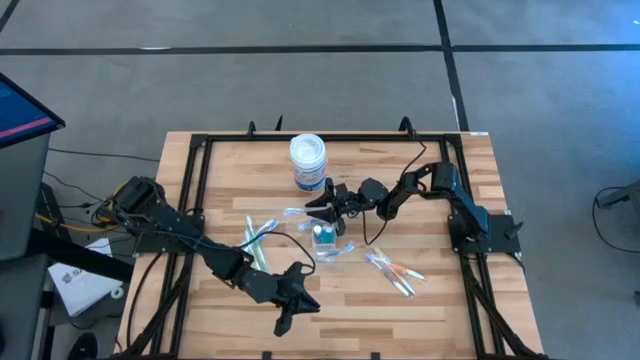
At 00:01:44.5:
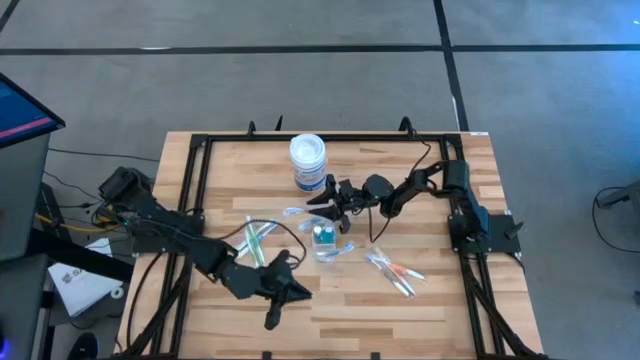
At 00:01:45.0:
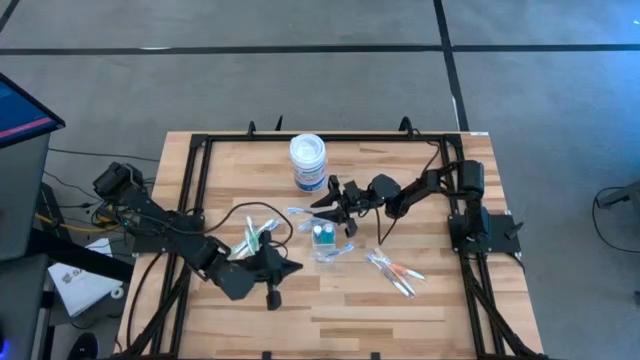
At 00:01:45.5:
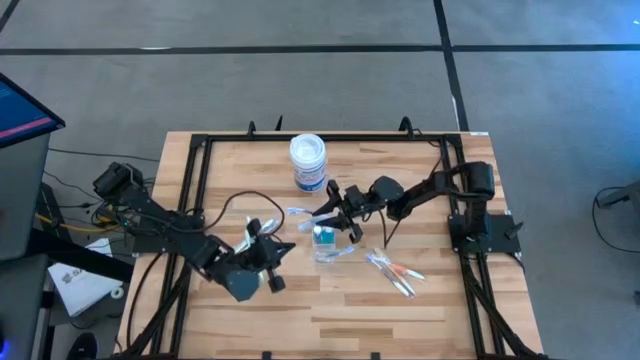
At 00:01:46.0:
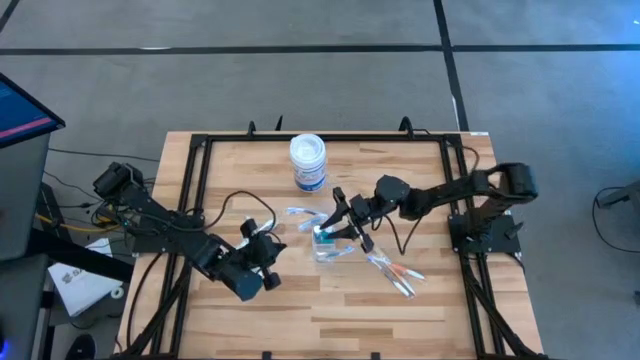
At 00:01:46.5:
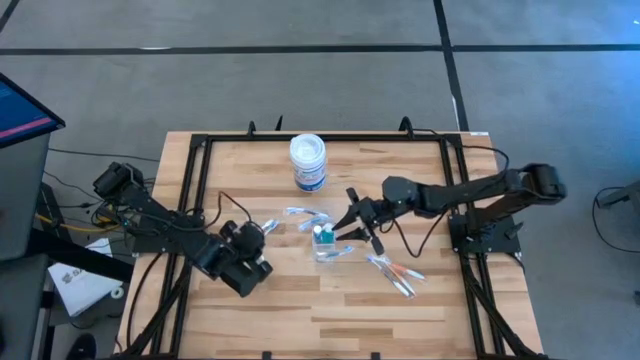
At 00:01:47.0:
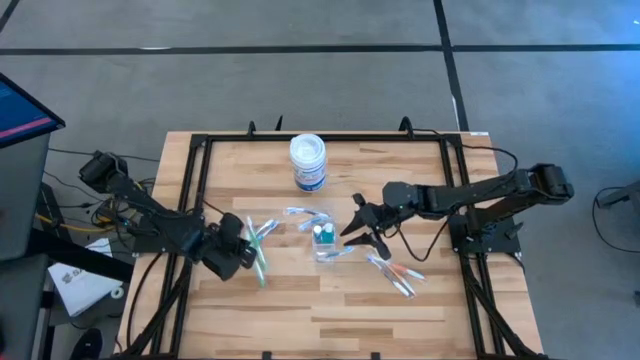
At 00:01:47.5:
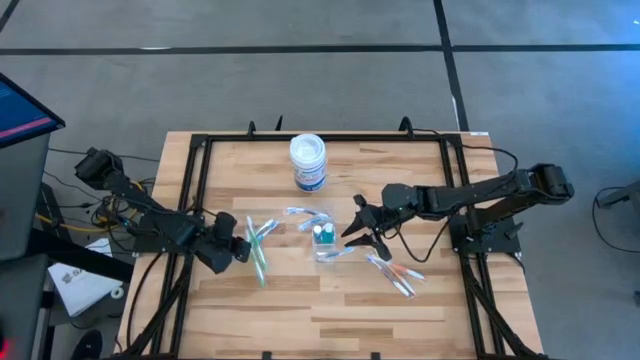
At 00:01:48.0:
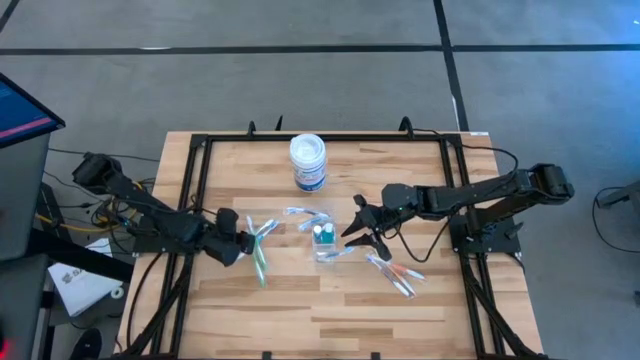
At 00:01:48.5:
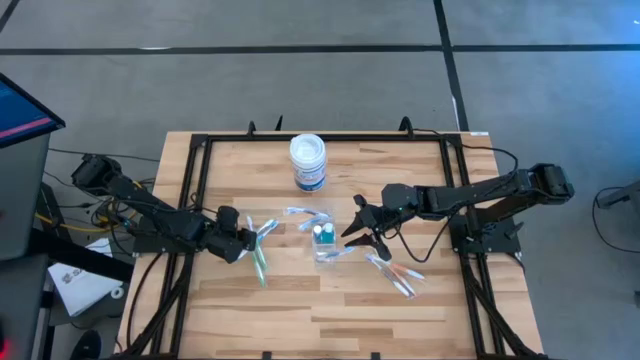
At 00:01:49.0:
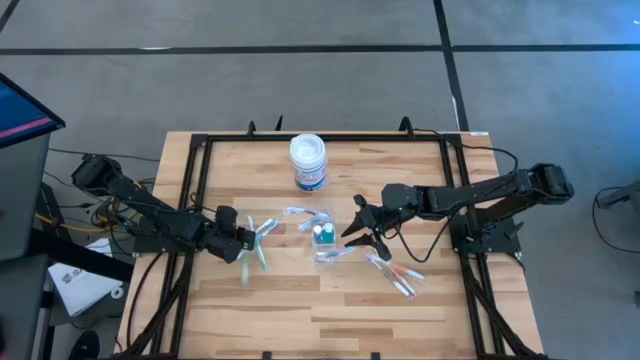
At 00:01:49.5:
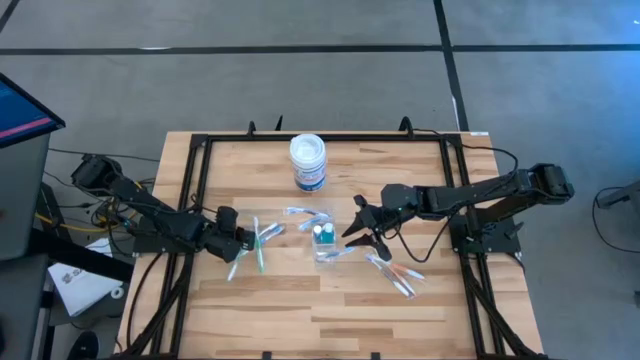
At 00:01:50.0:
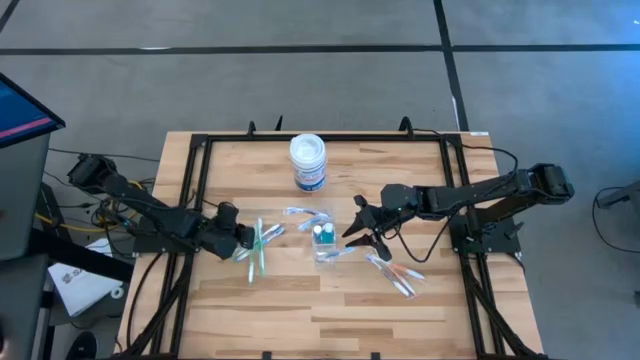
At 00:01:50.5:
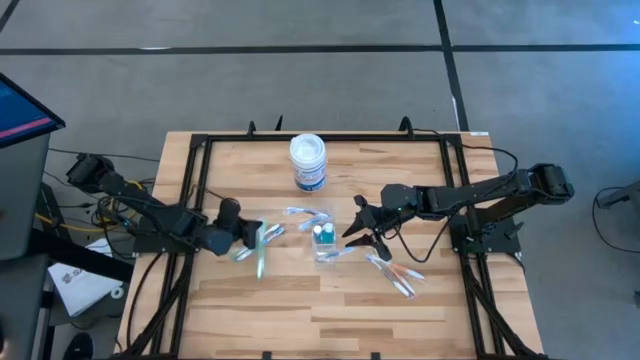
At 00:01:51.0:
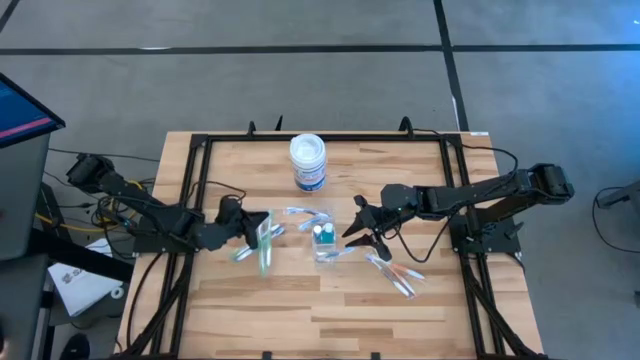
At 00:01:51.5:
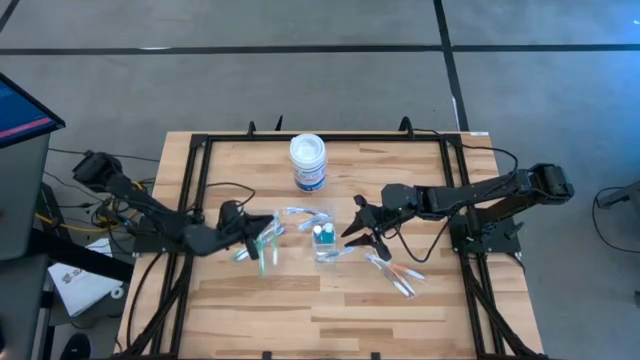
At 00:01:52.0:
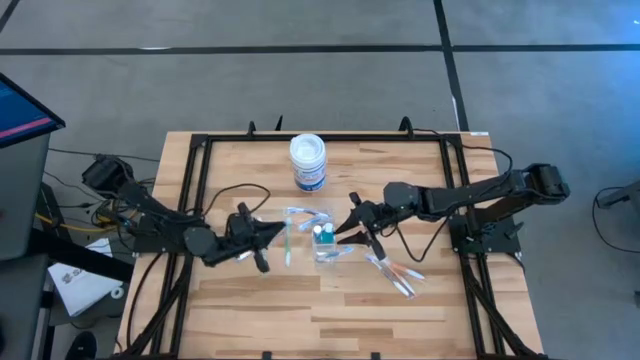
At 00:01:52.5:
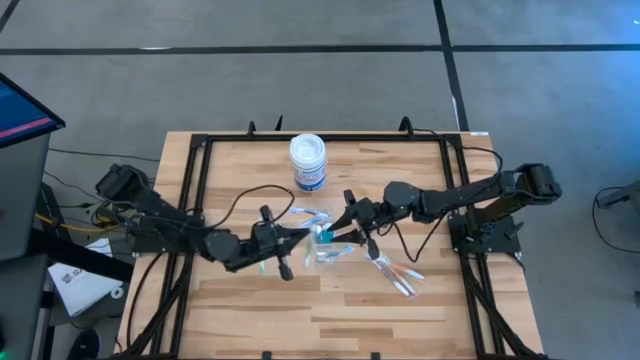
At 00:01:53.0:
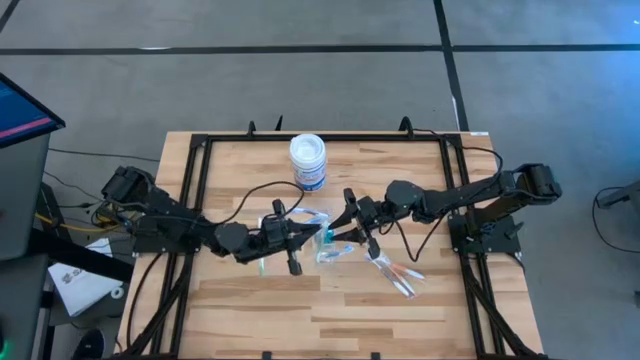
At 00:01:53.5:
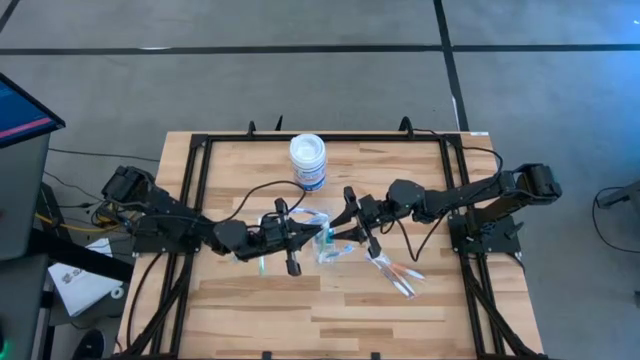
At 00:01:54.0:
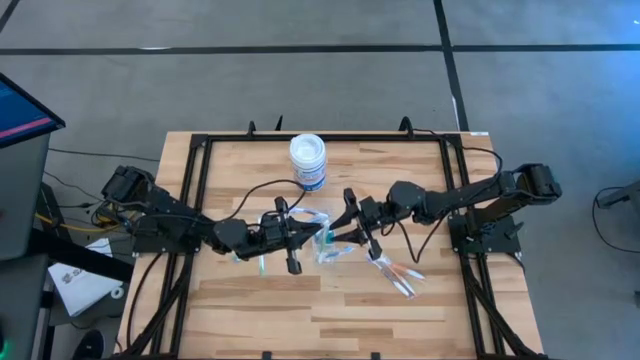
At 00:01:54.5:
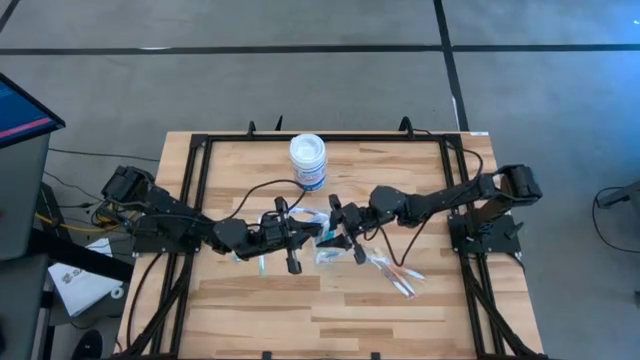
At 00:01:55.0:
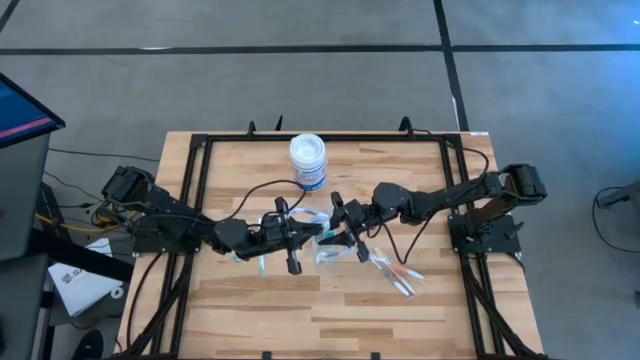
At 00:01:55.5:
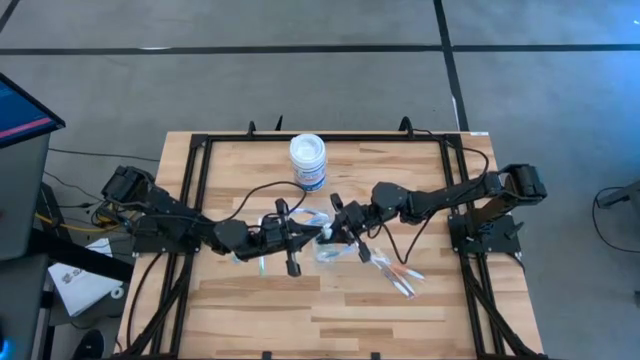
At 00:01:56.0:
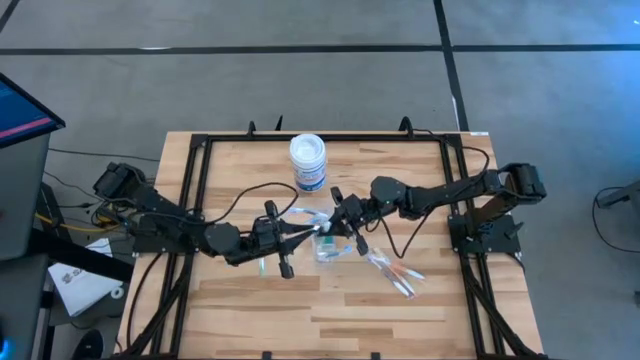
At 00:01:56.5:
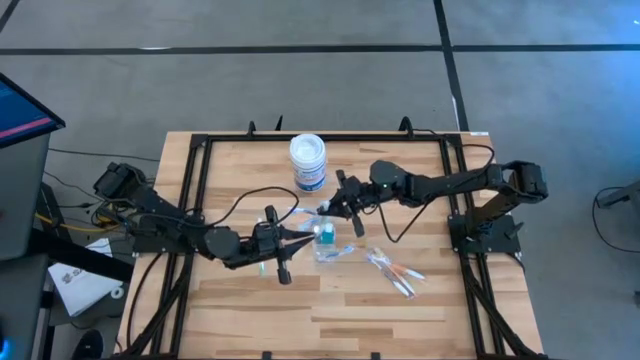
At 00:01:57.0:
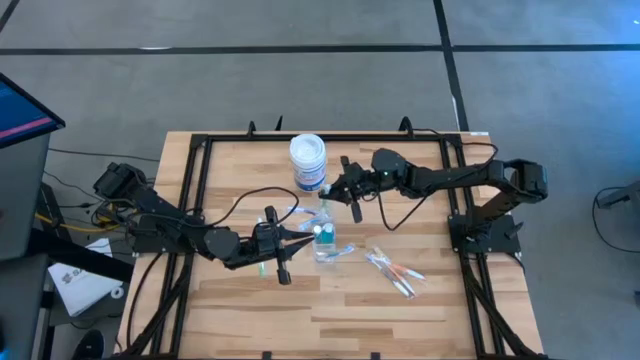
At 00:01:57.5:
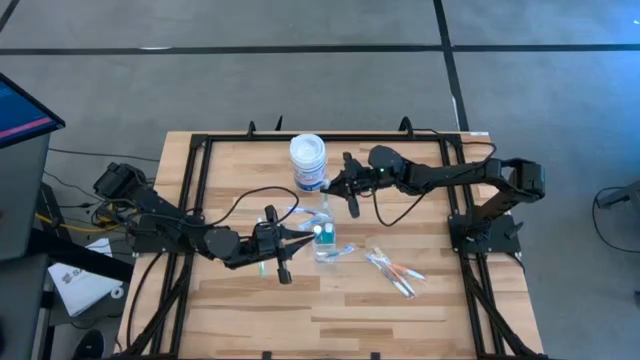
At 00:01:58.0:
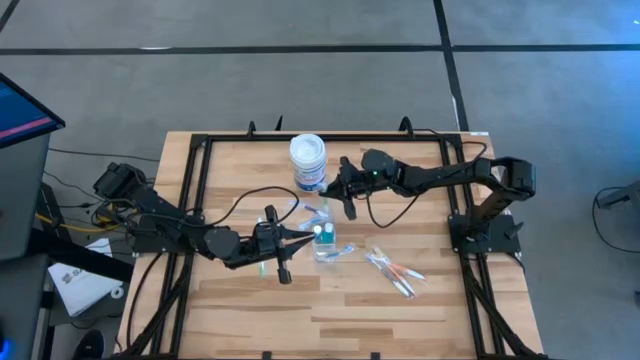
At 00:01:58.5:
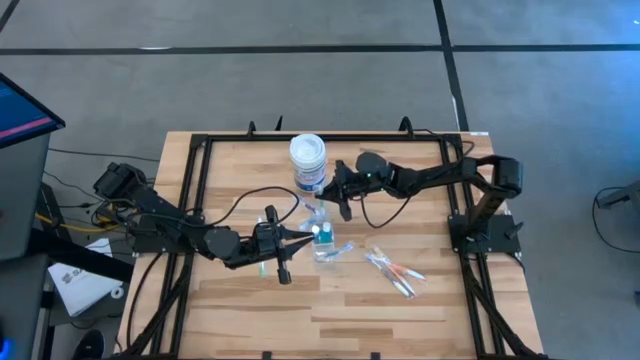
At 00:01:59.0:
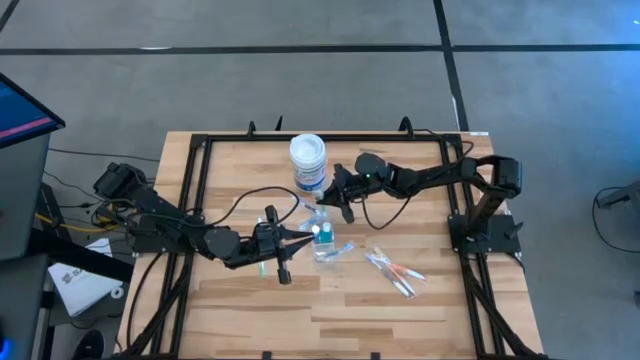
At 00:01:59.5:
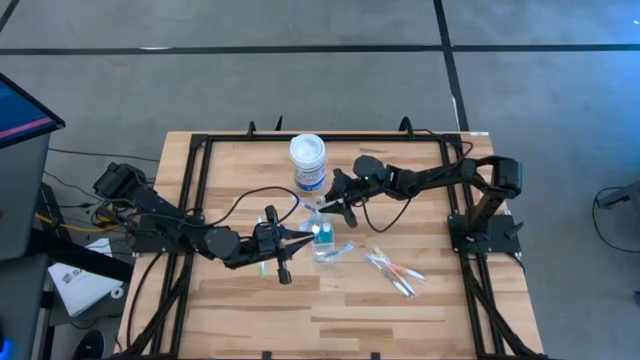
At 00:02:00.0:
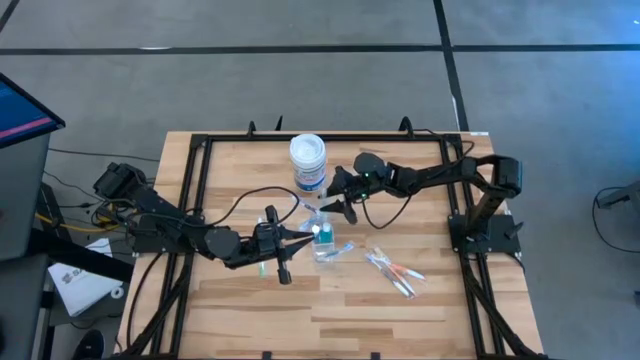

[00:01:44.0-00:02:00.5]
Task: Pick & Place toothbrushing station
Put the left green toothbrush into the Transparent organizer

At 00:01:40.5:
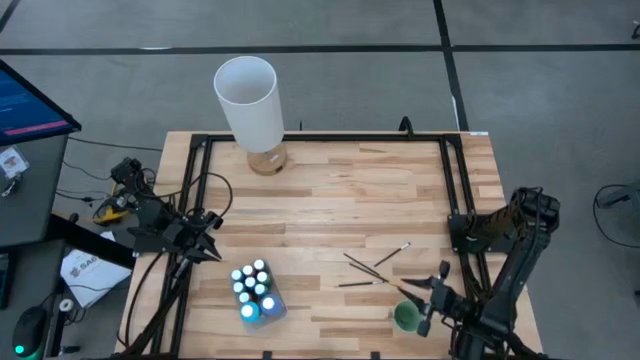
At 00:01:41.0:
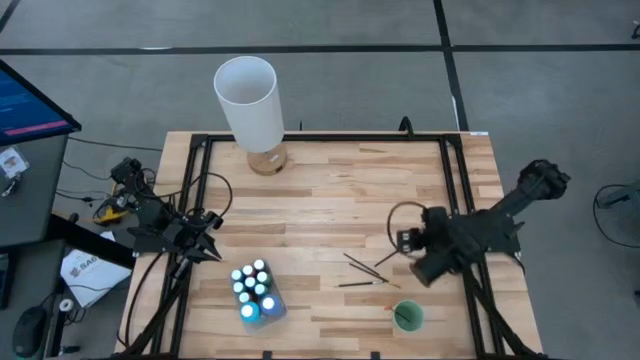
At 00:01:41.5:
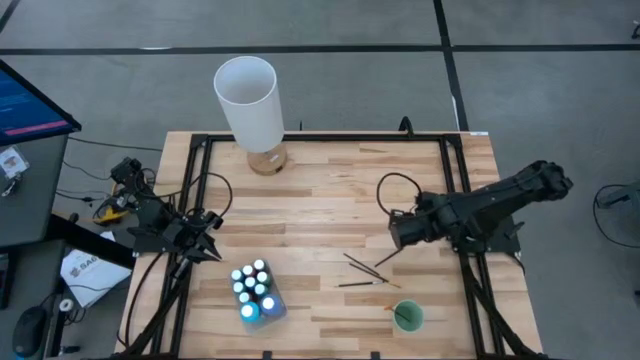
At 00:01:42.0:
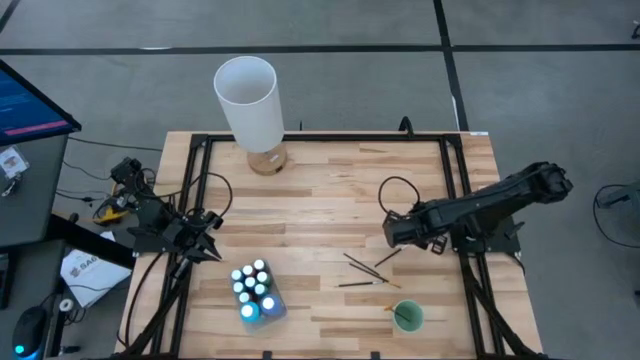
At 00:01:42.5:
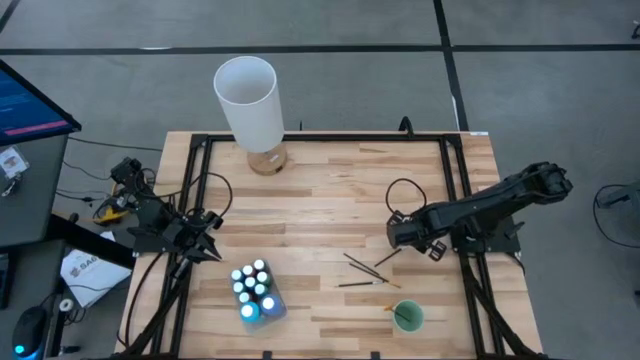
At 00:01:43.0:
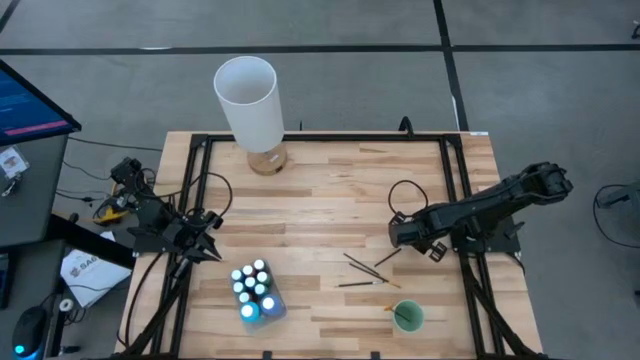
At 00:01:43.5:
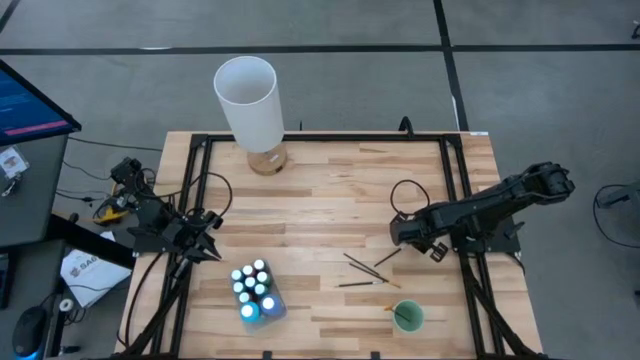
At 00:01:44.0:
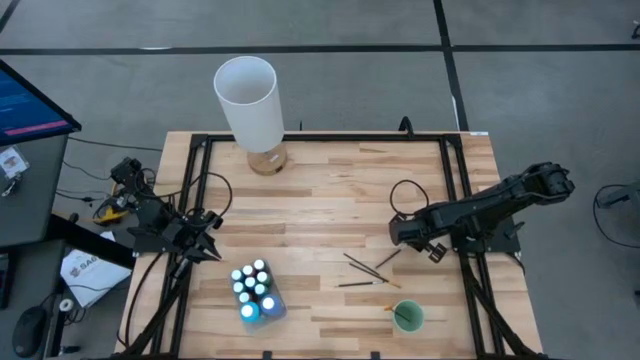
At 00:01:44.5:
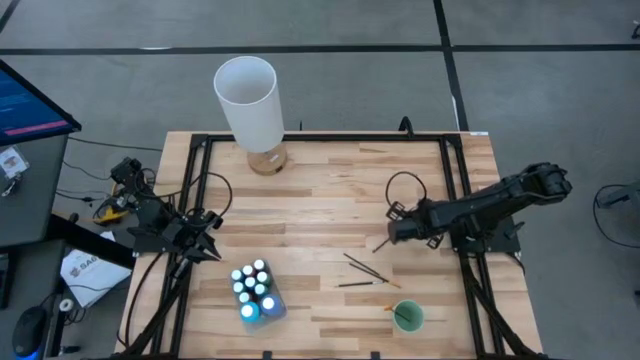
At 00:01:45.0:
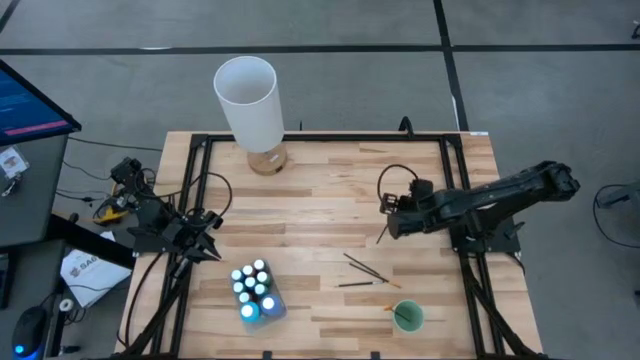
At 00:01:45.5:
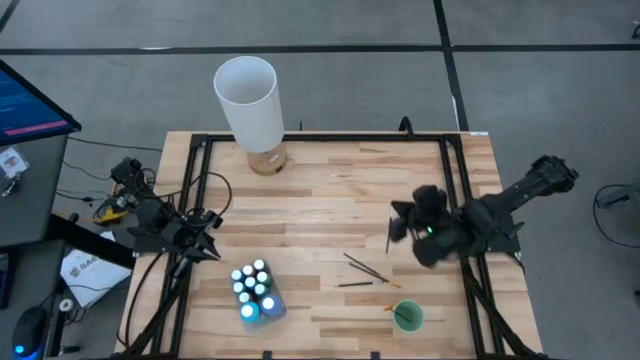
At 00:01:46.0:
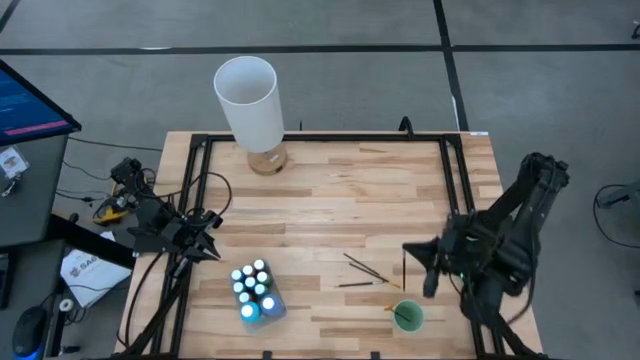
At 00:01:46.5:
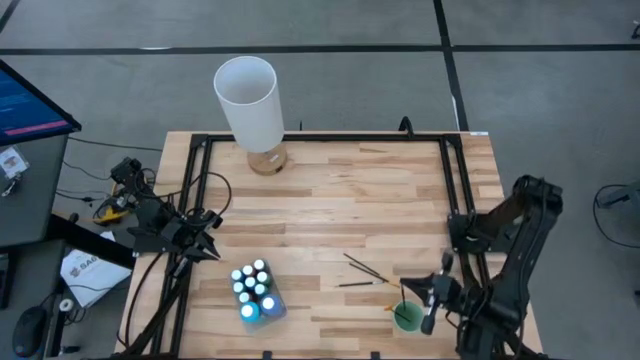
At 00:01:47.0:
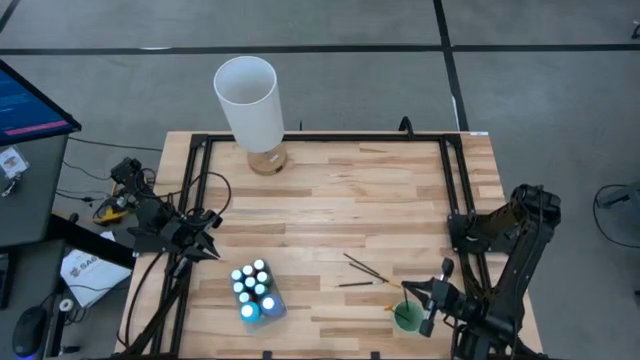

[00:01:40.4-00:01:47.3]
Task: Pick & Place Paint Supplies
Put the silver eyeshadow brush into the green cup
